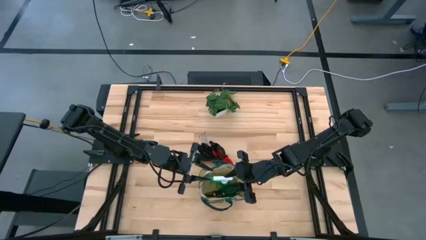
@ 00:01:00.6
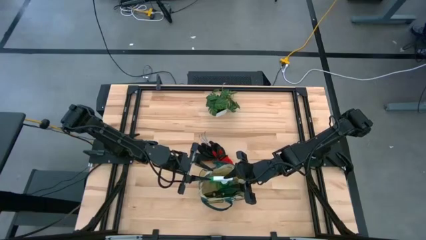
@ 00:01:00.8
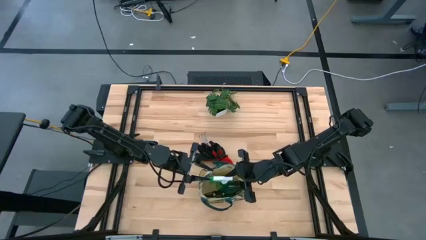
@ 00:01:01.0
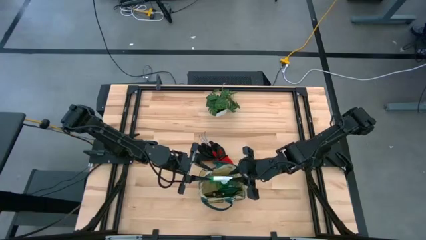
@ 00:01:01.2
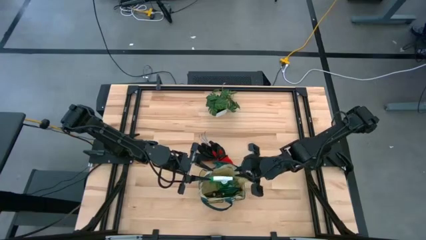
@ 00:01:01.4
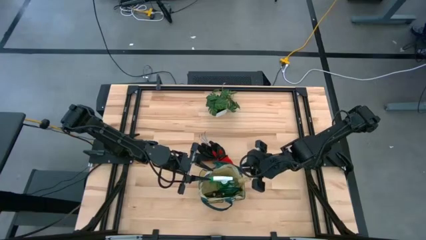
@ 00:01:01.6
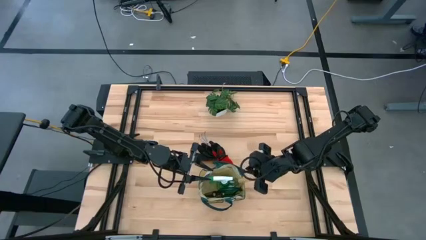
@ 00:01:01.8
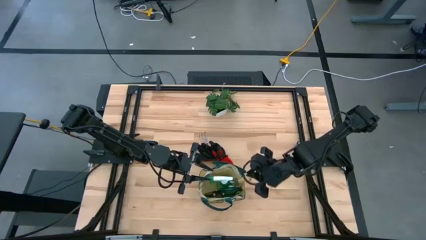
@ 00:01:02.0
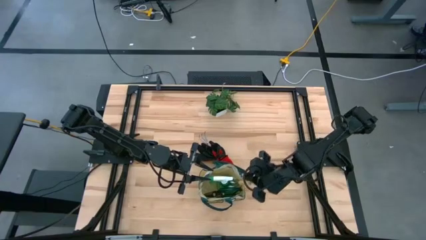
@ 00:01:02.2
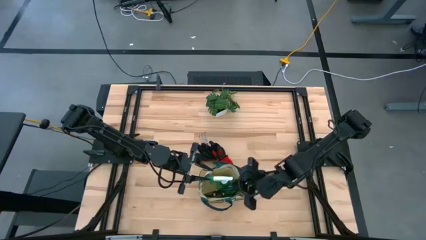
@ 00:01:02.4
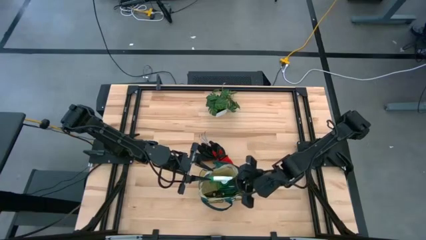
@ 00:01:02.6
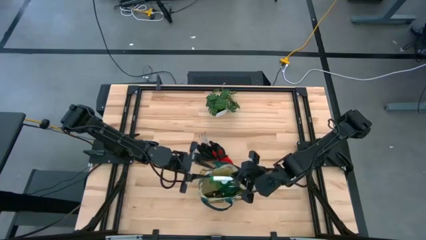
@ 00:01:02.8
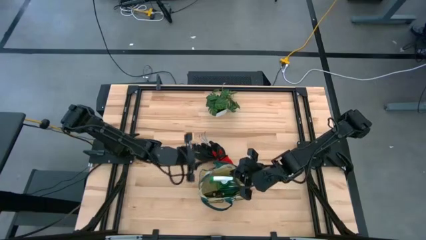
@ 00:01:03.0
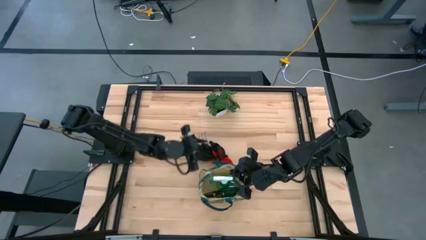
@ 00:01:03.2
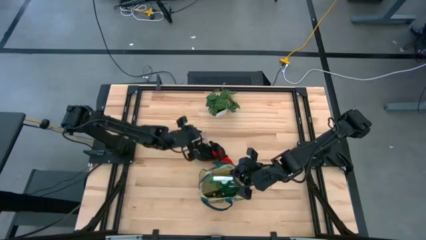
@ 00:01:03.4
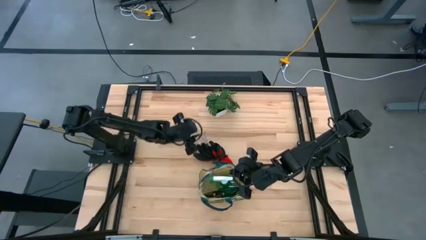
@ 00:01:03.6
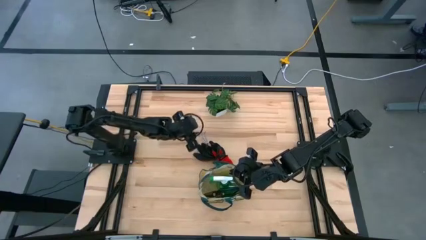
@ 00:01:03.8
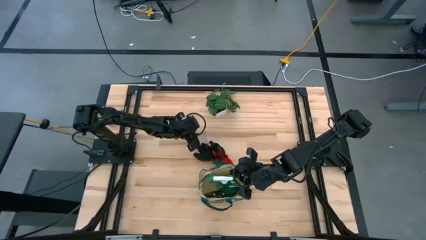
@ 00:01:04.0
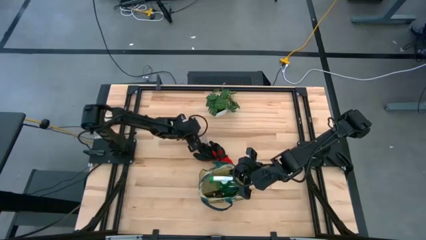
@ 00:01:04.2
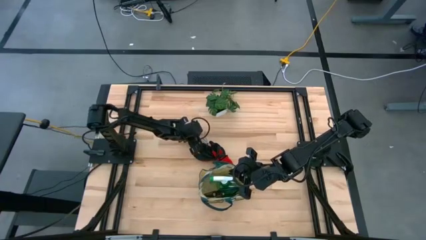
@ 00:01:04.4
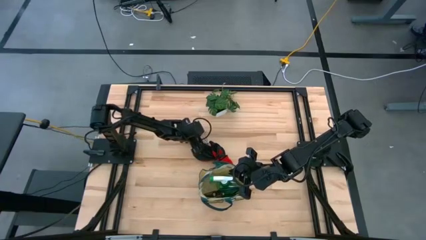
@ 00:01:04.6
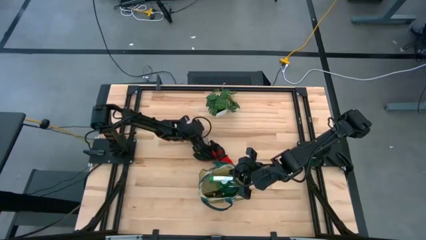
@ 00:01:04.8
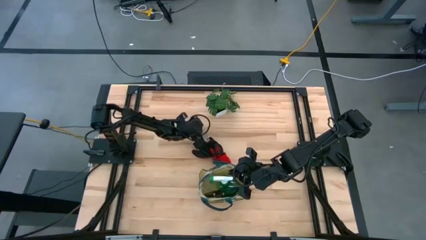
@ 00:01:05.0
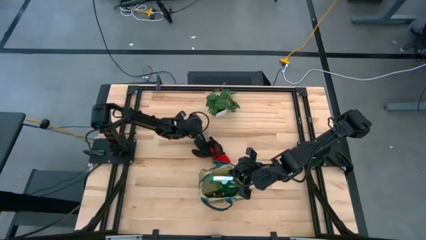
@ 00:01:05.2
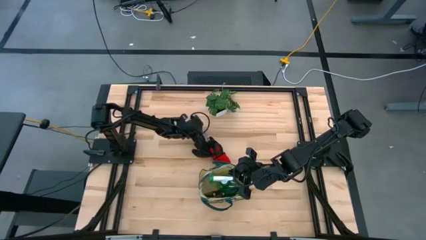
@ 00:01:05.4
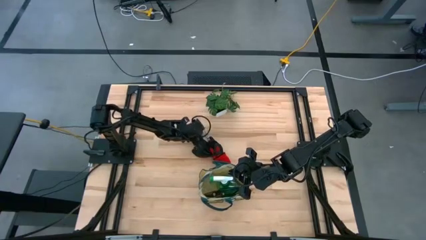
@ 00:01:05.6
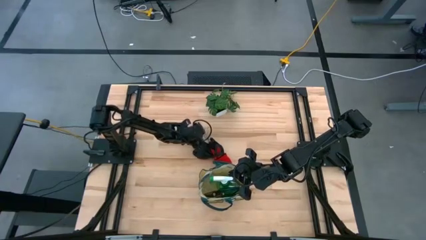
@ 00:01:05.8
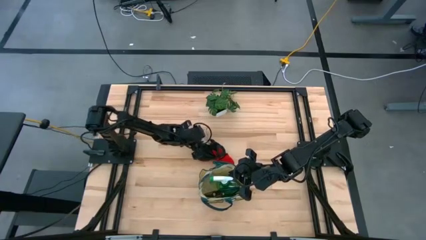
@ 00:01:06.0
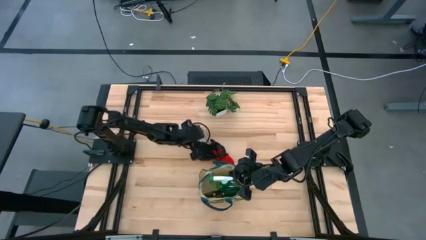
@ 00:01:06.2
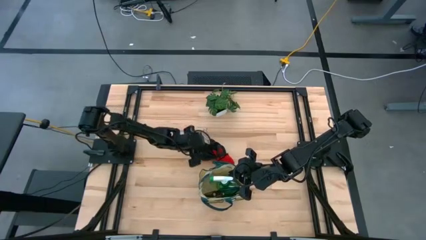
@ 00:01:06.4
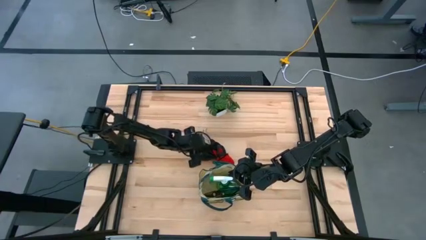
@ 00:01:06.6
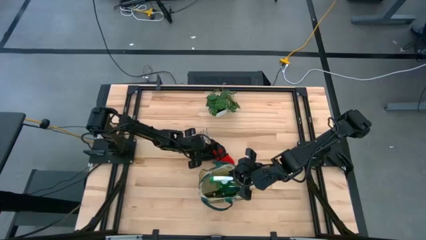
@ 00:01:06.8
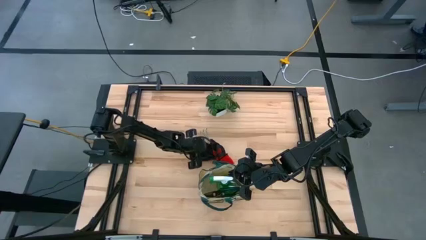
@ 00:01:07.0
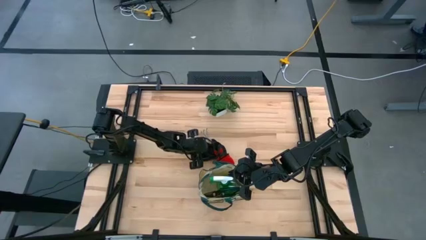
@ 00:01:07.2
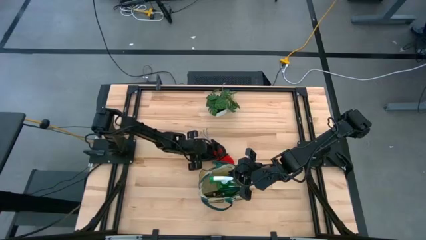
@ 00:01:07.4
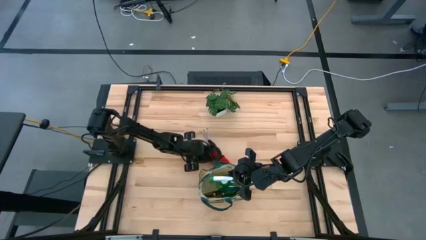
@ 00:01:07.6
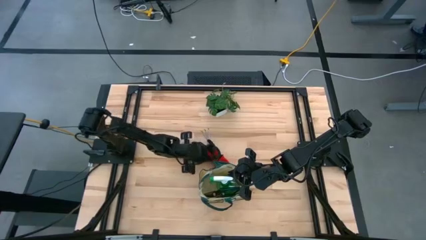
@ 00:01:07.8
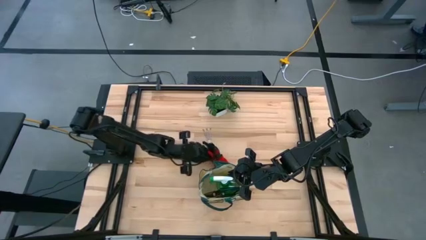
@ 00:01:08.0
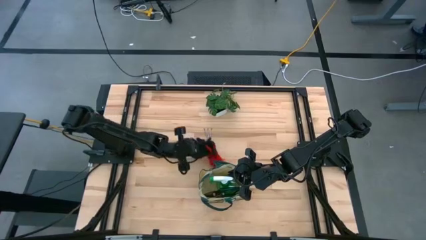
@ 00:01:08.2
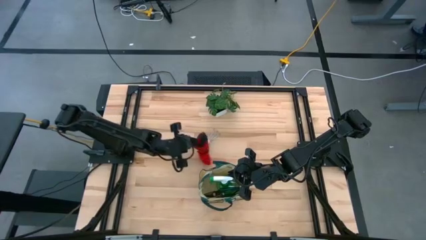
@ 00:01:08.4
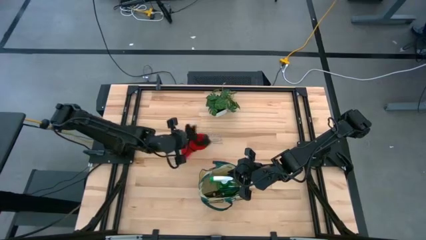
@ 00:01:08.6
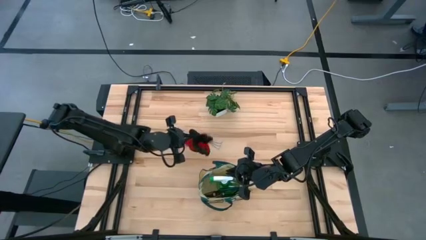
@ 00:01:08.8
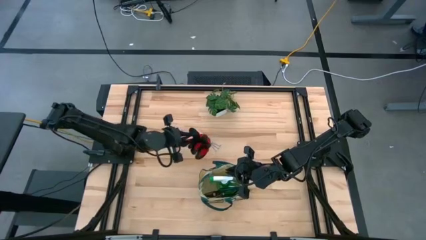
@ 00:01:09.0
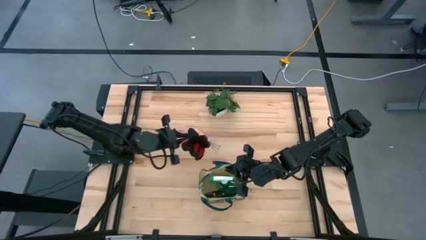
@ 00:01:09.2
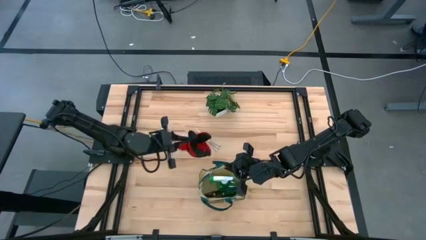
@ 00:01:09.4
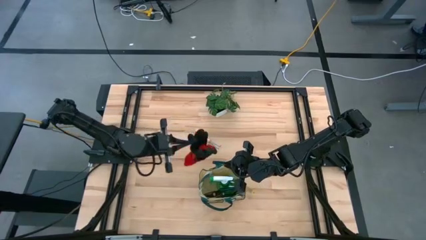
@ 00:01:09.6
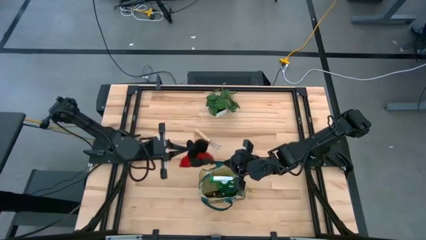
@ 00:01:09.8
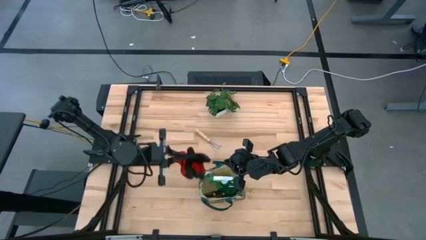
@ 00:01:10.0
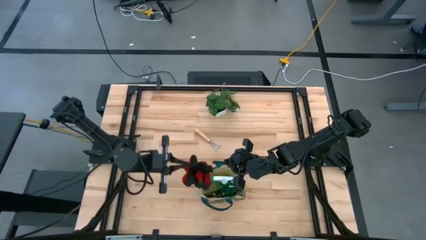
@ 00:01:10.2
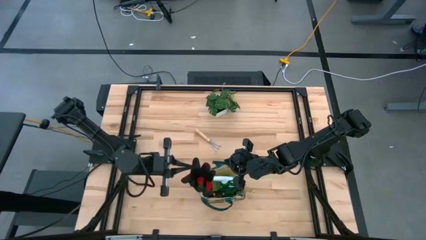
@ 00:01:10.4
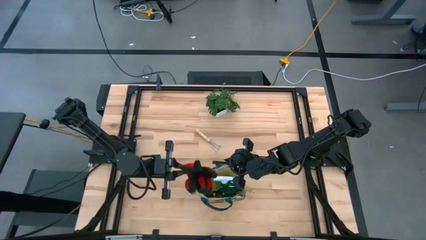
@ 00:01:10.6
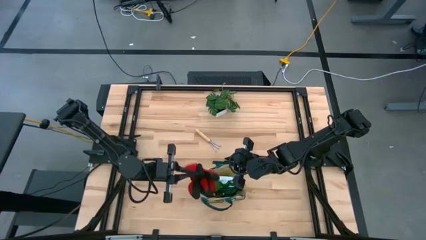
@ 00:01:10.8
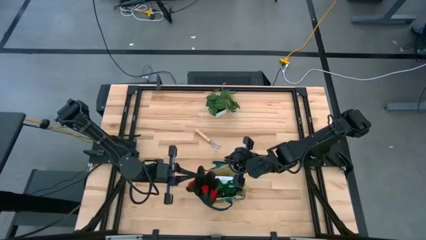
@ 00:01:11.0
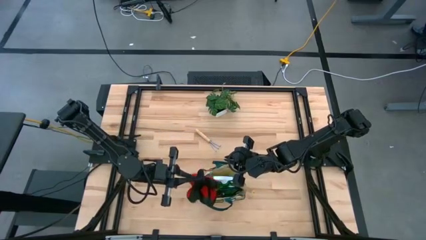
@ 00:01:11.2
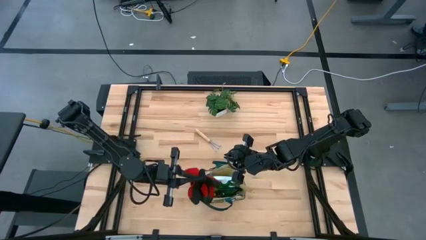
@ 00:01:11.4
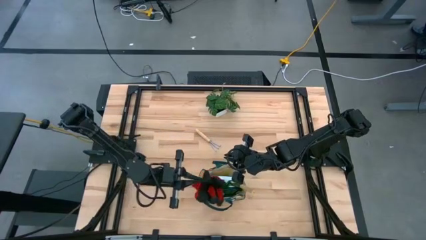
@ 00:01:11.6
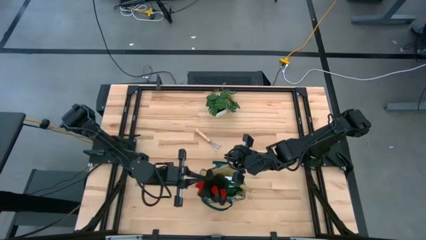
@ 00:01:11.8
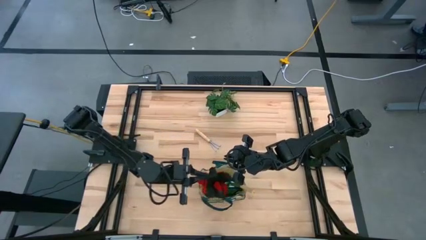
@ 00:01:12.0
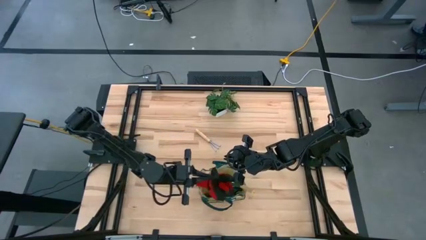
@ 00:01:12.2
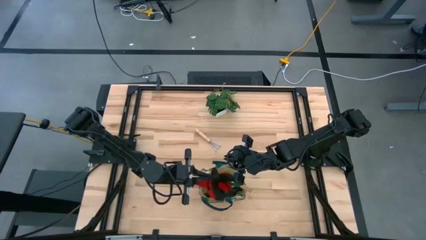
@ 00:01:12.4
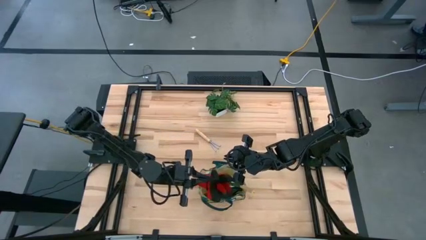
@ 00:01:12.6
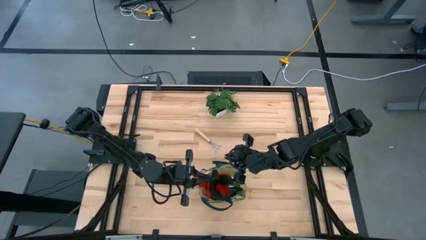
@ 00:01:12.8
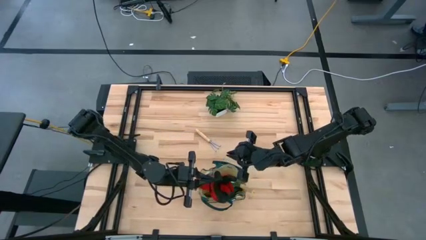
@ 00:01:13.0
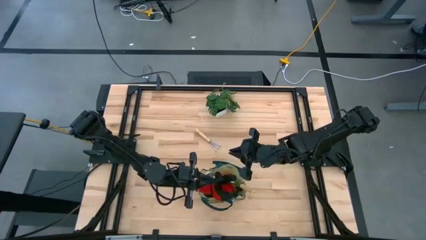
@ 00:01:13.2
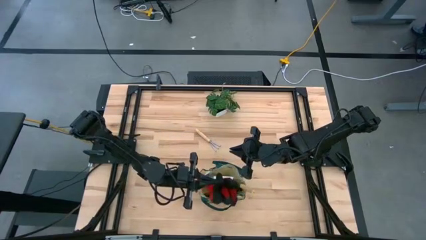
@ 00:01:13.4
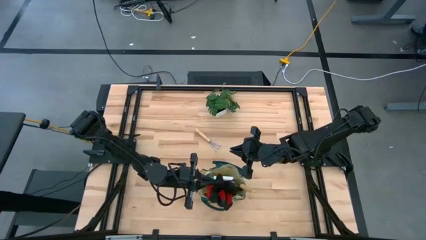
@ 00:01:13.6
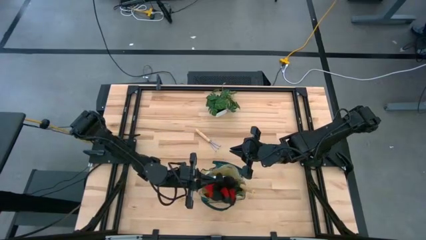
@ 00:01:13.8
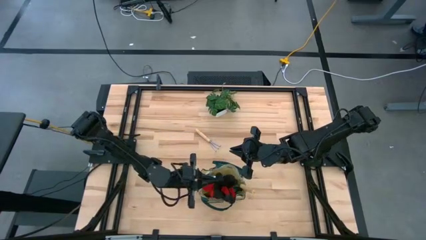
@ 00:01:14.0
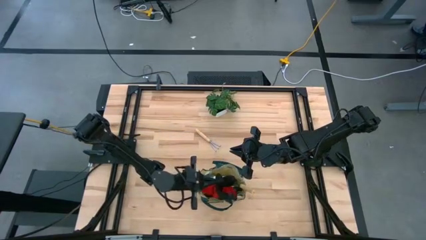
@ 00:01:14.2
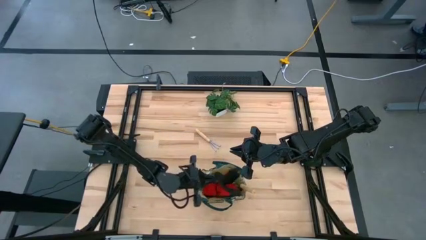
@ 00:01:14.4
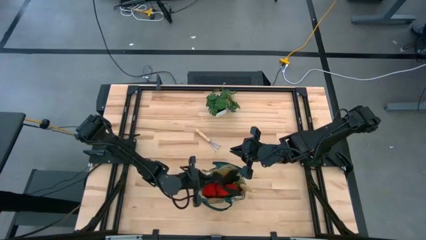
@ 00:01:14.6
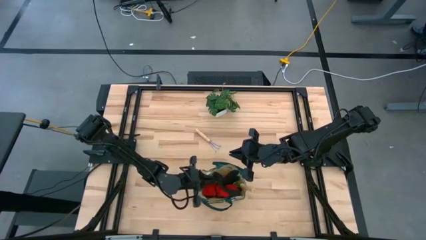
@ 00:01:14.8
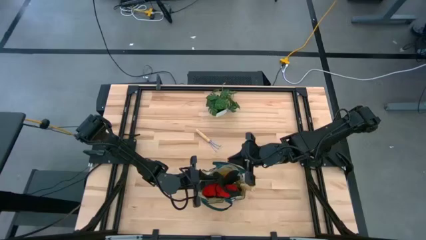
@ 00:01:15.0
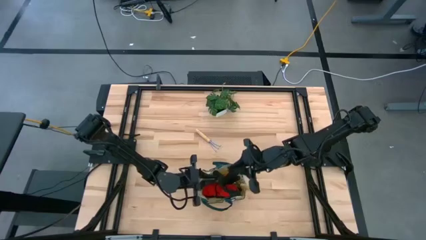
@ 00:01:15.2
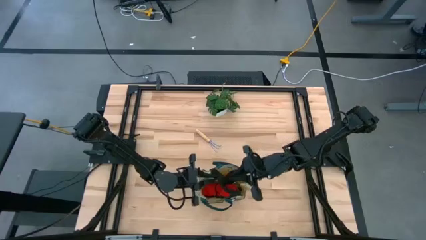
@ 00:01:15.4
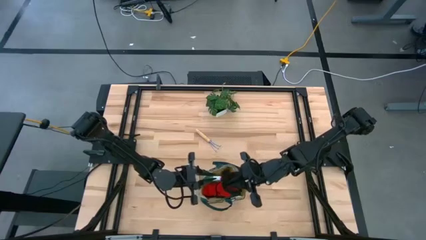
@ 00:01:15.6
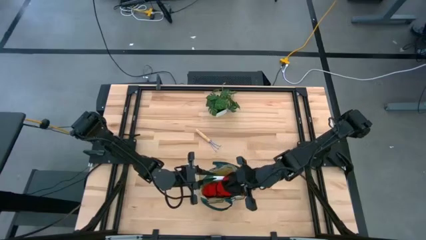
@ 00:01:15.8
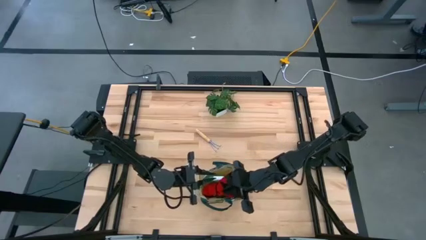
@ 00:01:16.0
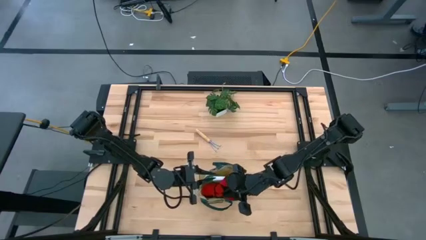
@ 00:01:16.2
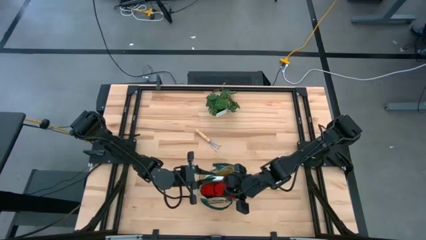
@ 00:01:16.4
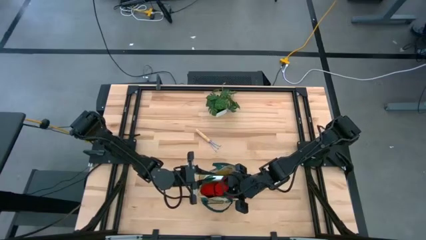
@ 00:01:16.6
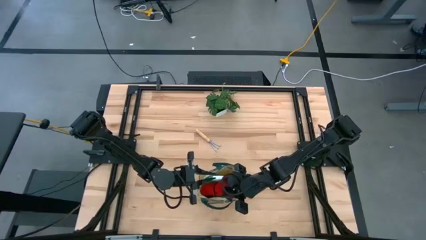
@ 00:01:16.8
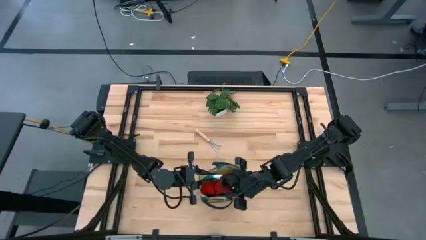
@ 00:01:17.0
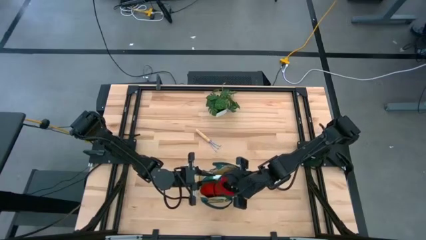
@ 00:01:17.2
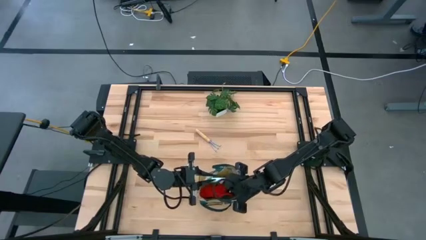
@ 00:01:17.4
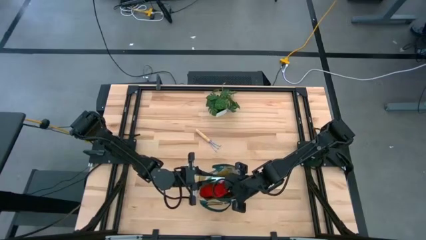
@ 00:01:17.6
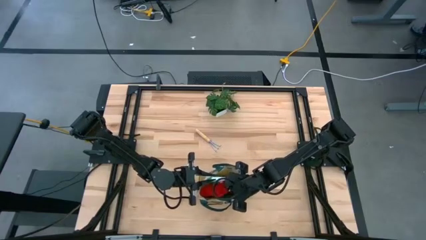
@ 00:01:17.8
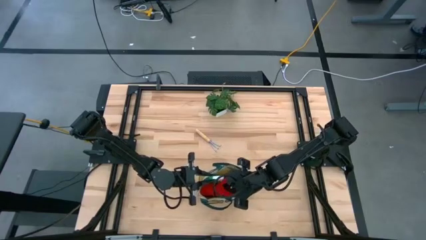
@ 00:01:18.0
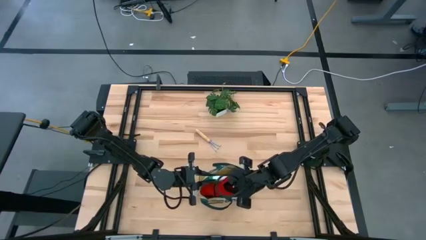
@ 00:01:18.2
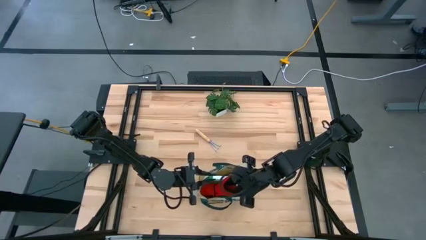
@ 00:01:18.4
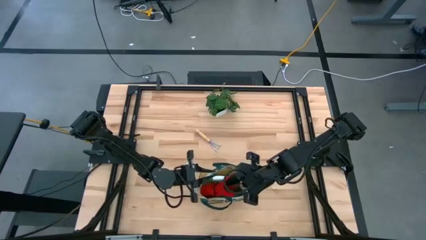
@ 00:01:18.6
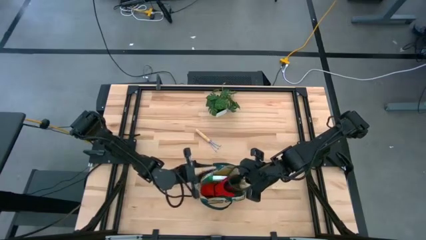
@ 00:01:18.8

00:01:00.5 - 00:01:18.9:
Task: Pick & Place Garden tools in Gardening bag
Put the red gloves into the gray gardening bag
